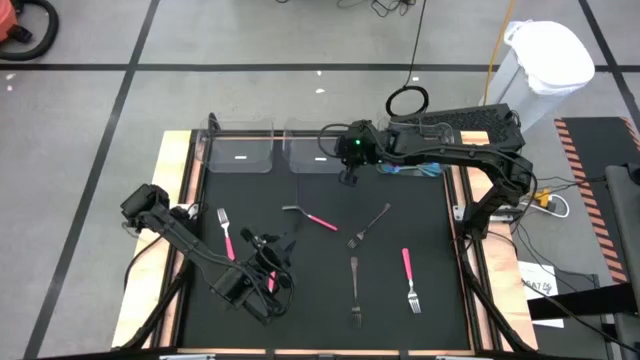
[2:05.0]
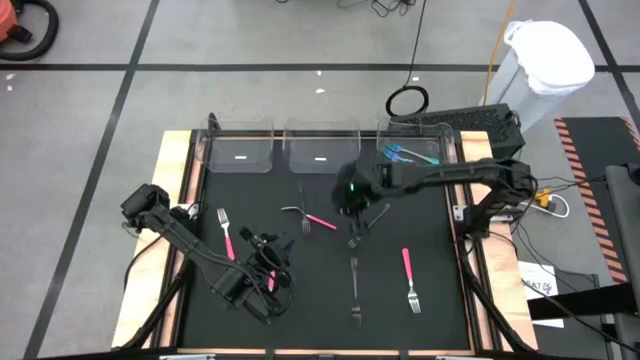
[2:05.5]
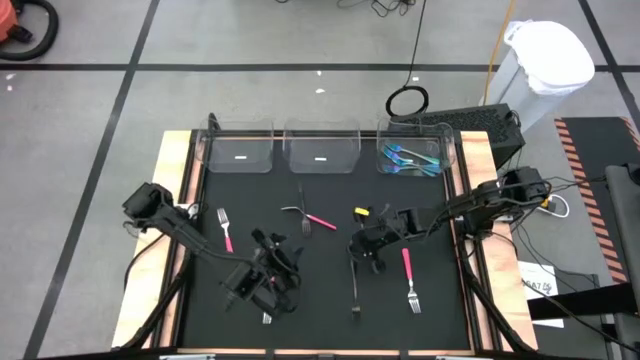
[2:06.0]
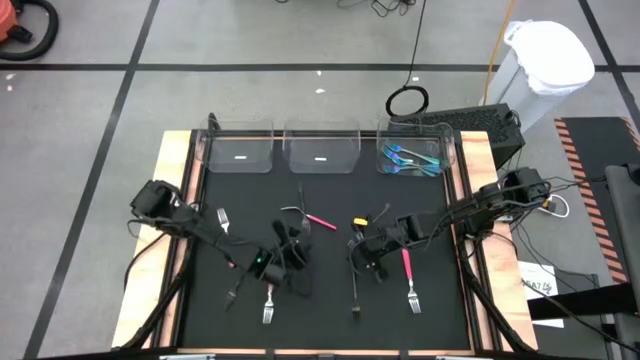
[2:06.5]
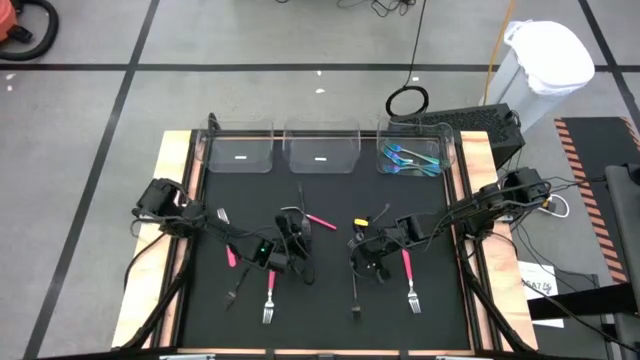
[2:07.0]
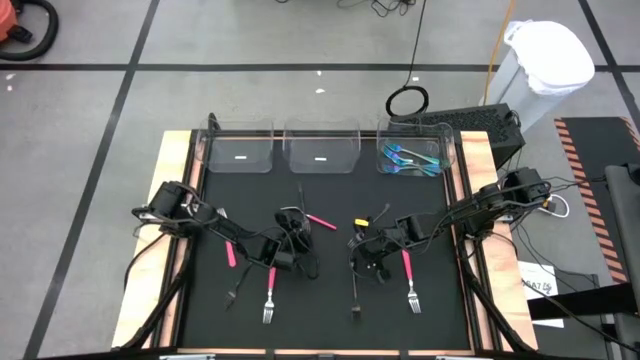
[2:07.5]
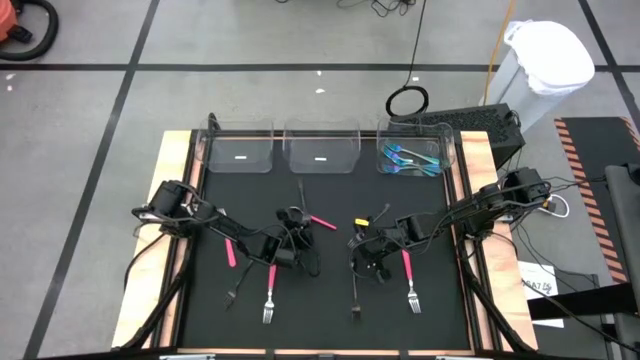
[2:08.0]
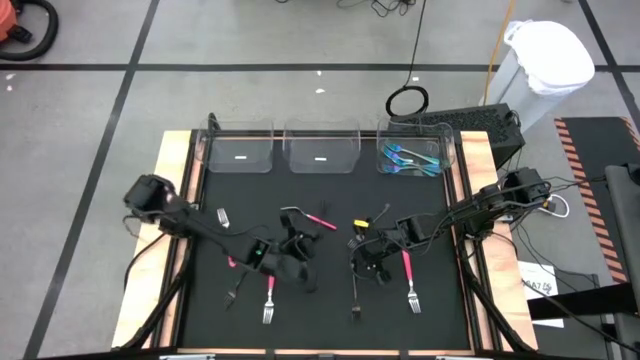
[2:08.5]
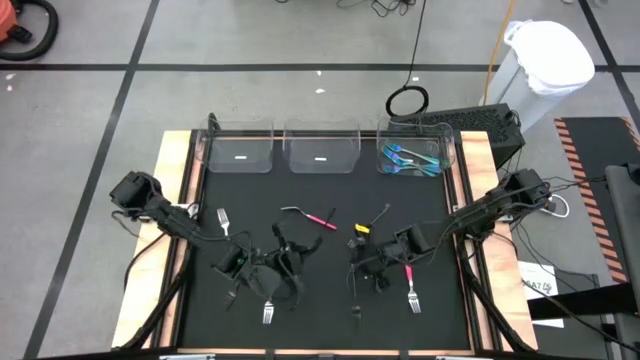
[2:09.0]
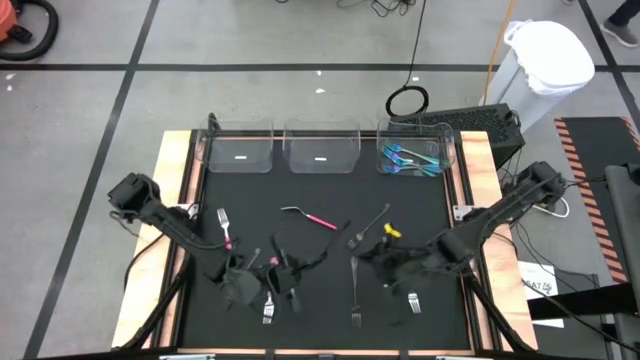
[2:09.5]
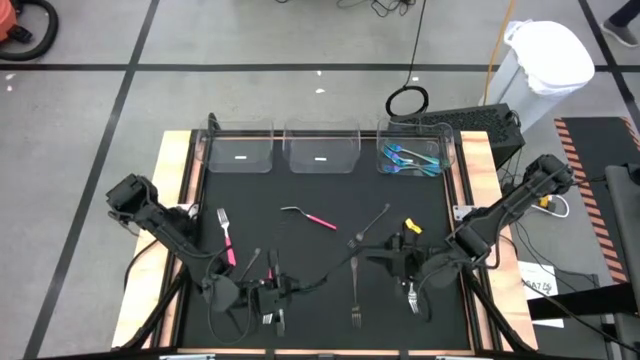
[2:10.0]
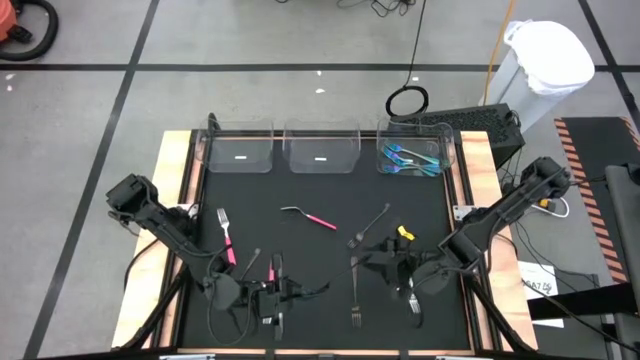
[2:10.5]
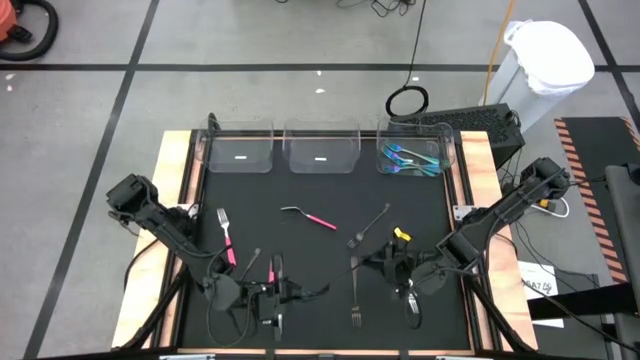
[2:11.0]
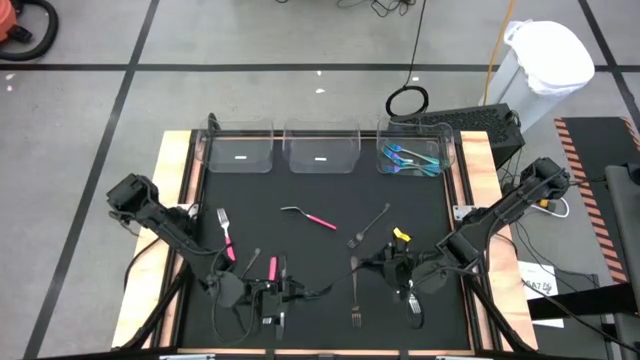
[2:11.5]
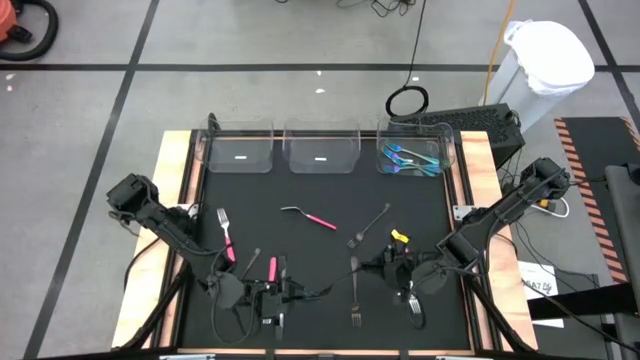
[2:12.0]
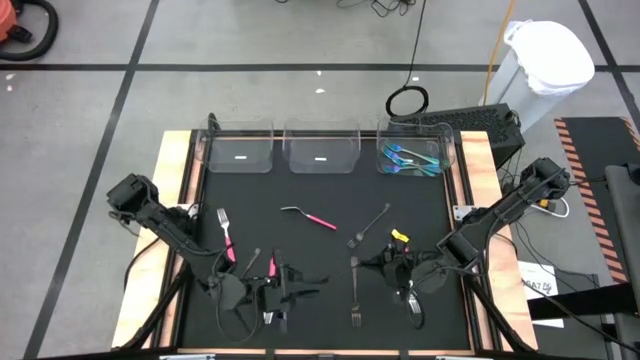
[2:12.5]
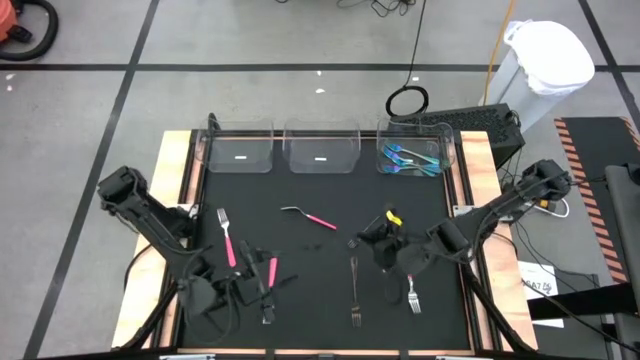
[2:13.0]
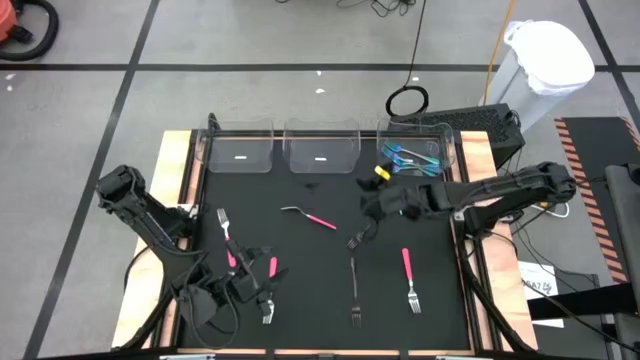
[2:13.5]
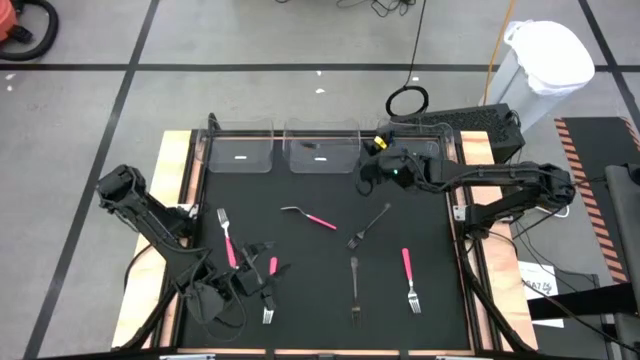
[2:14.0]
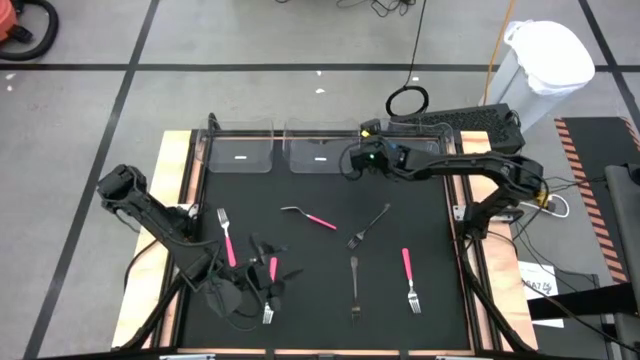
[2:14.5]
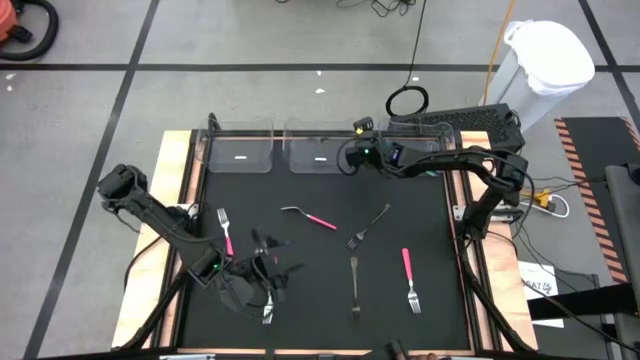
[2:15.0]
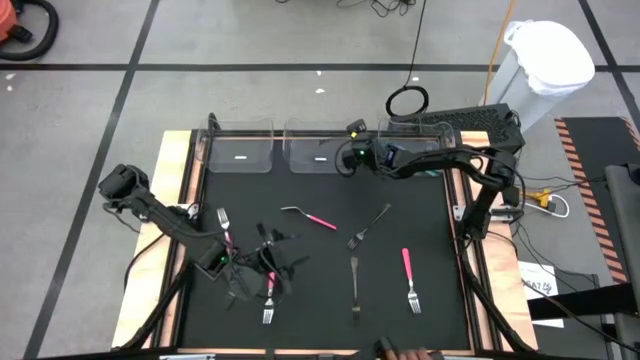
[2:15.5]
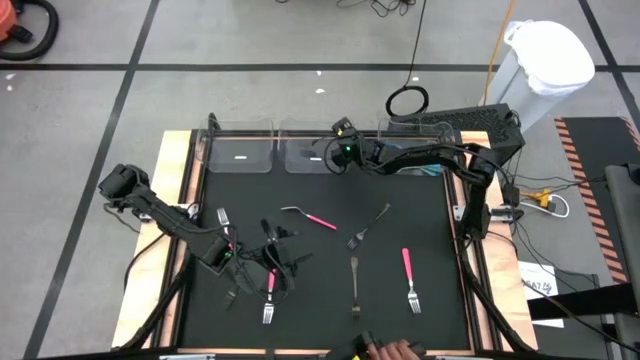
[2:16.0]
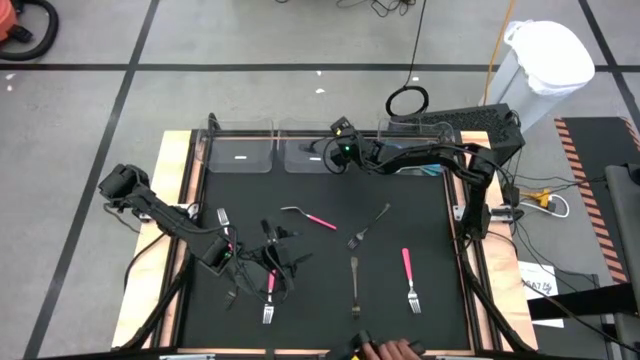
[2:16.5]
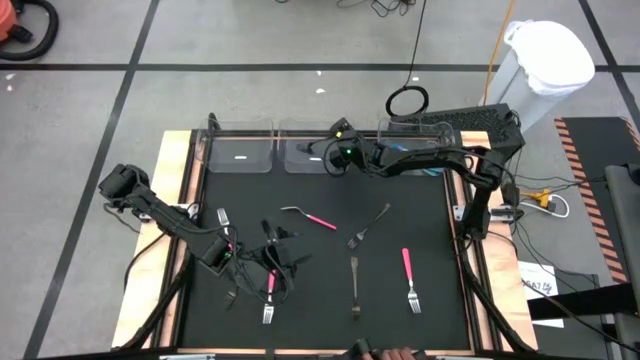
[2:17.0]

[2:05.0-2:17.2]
Task: Sort silverware by color (type)
Put the black fork into the middle transparent bin

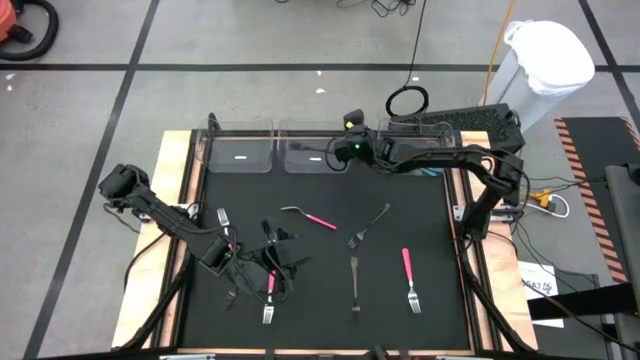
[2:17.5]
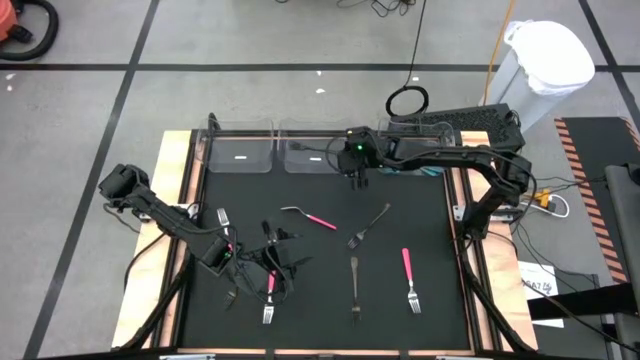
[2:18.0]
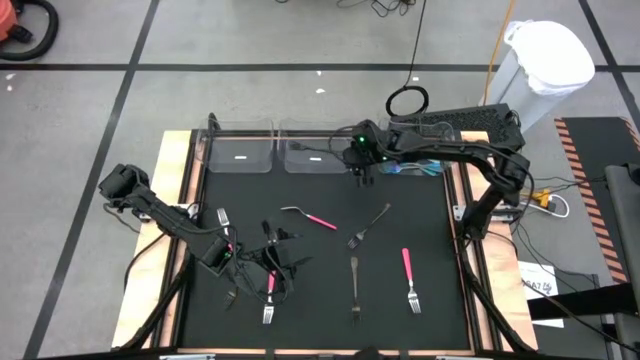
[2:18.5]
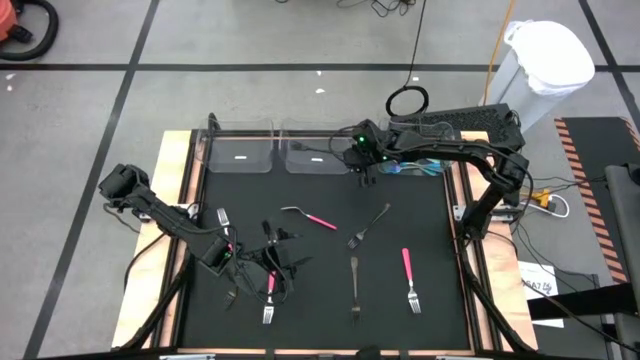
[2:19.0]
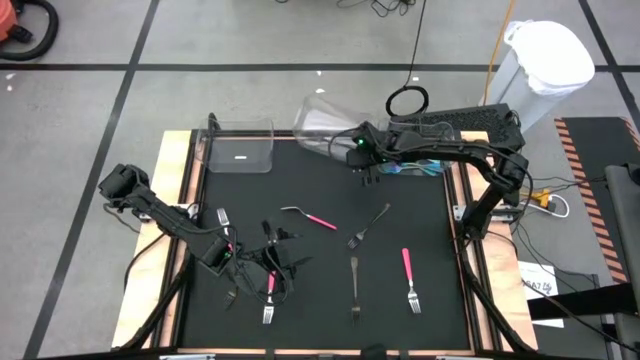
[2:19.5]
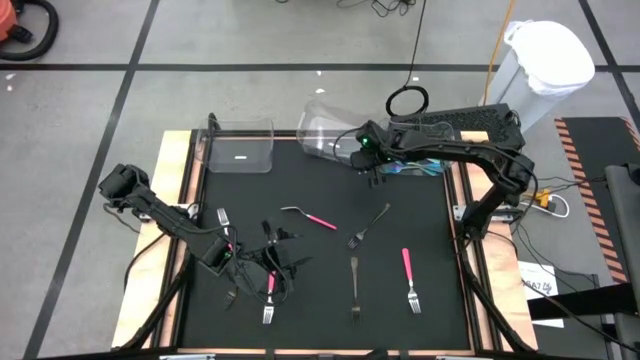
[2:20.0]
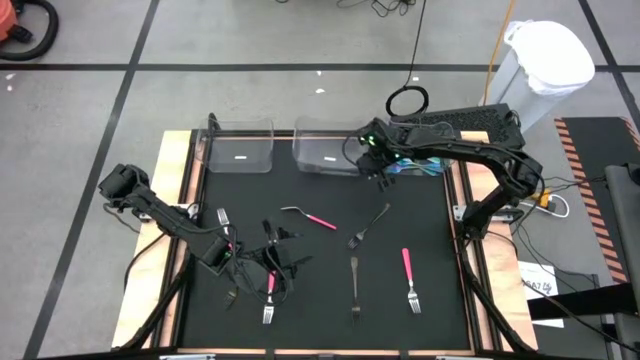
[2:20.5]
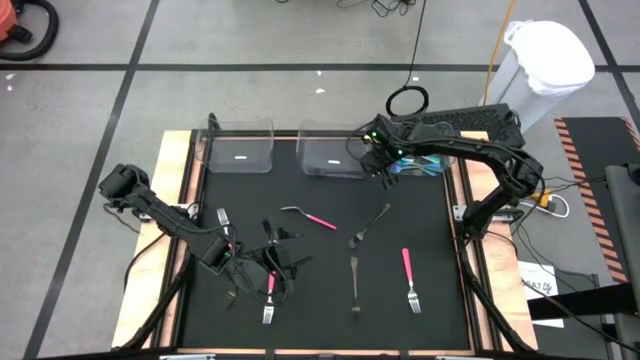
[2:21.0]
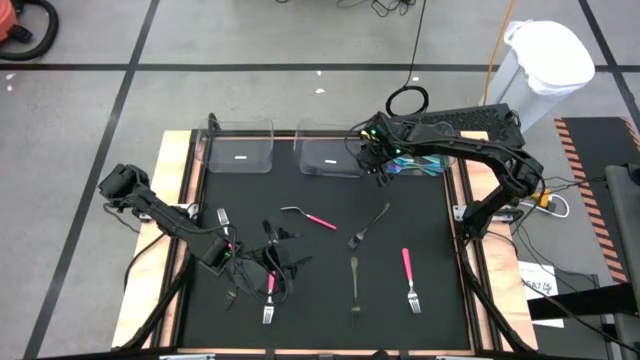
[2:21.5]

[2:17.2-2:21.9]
Adjust the middle transparent bin

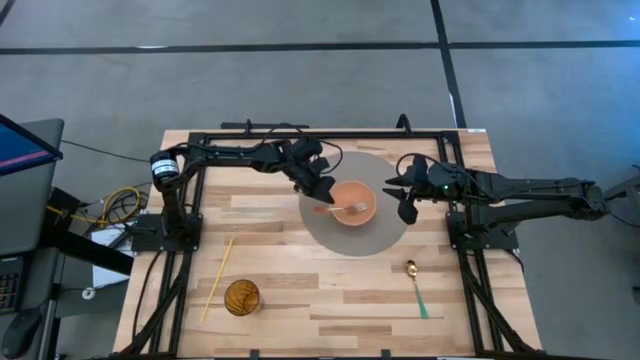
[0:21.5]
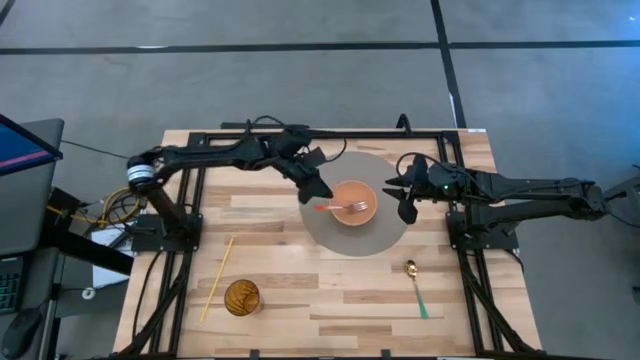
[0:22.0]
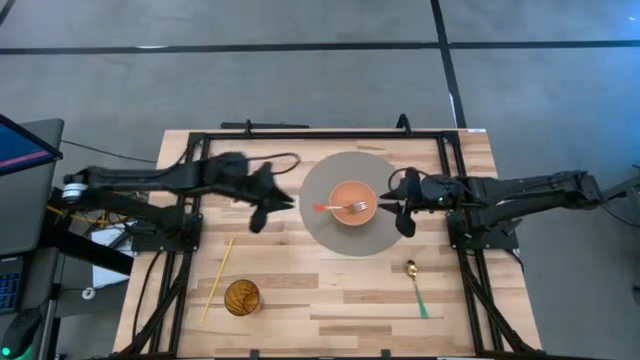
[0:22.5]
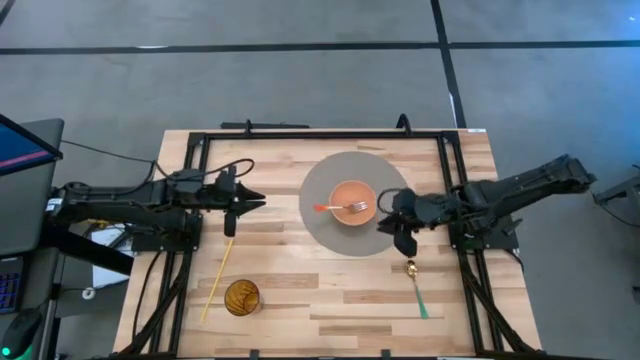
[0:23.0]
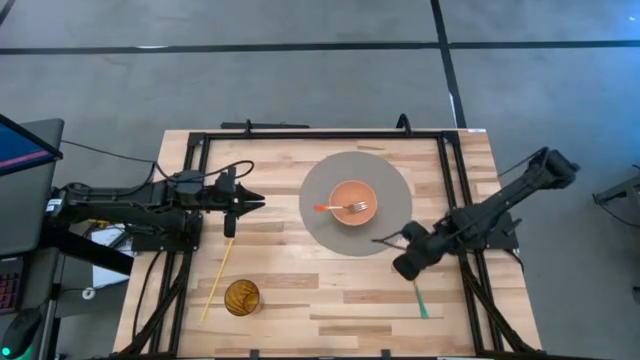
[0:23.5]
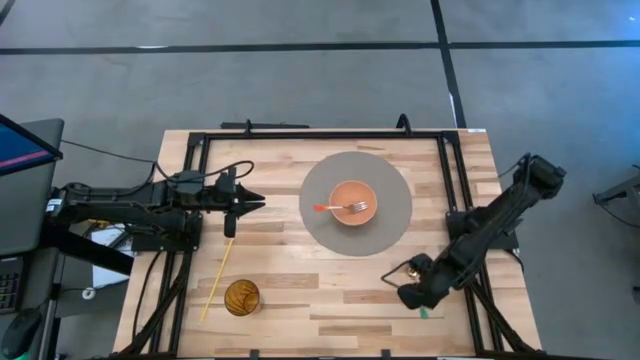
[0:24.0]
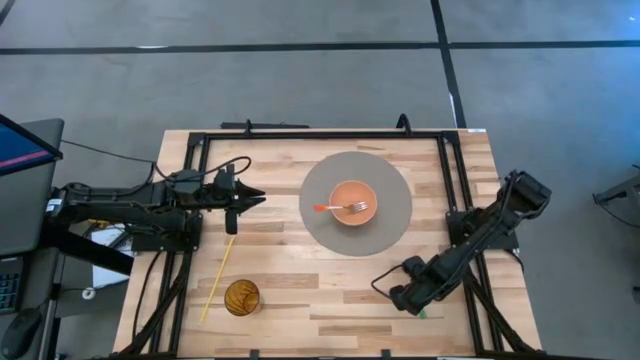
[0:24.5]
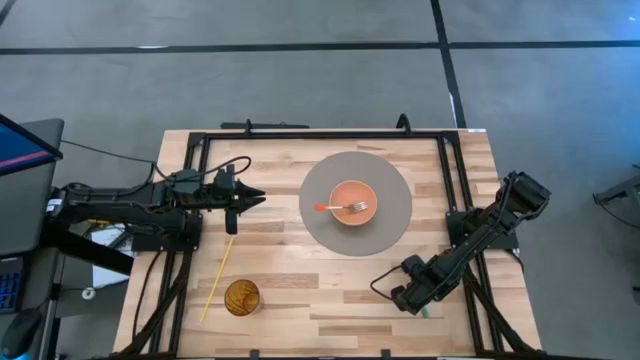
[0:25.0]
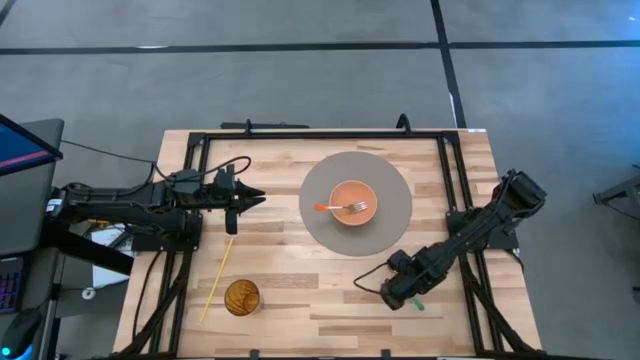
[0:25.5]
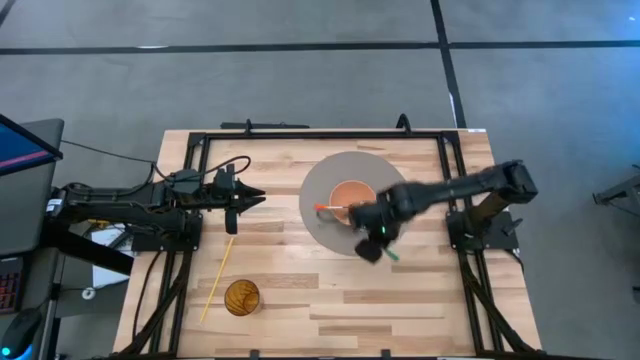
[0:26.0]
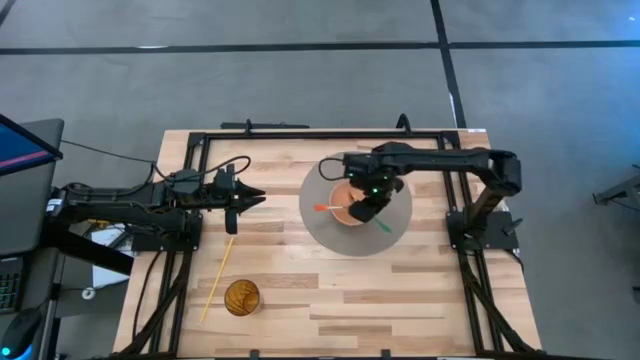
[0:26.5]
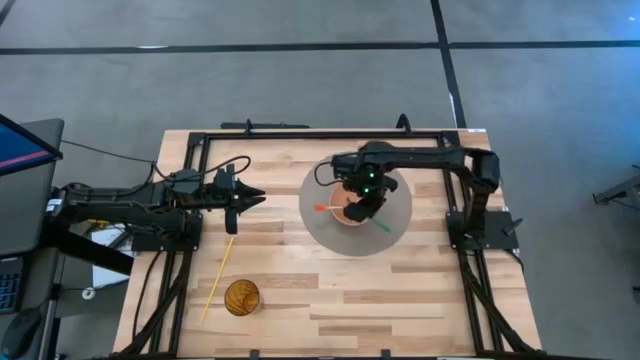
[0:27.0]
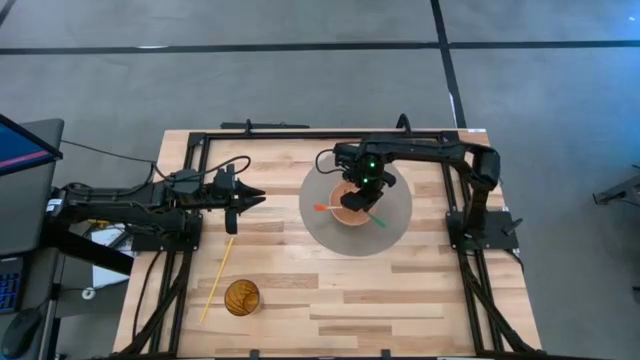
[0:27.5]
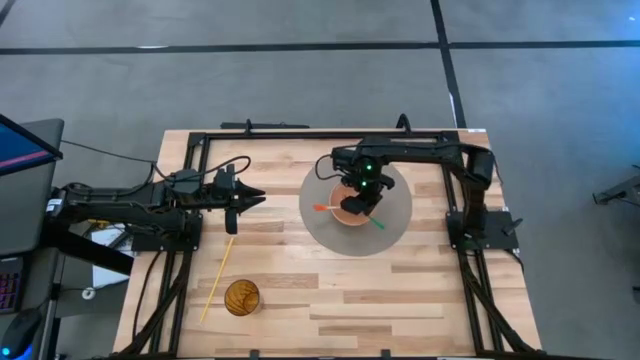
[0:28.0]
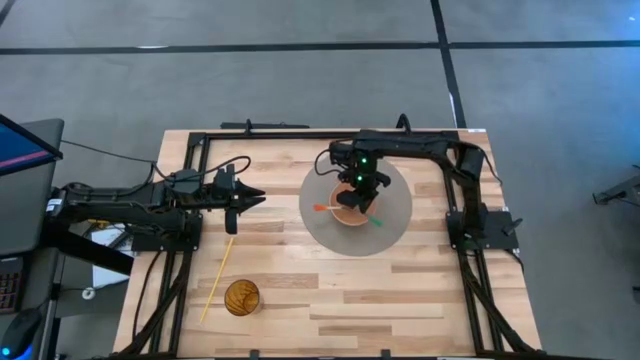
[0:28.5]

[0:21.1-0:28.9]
Task: Pick & Place Utensil
Put the green spoon into the orange bowl
